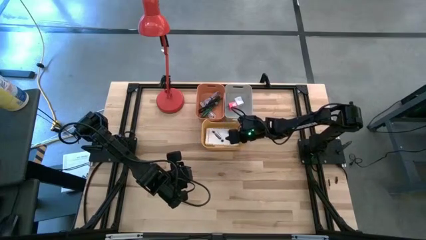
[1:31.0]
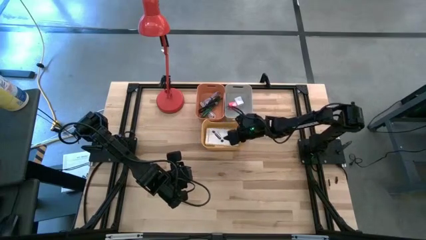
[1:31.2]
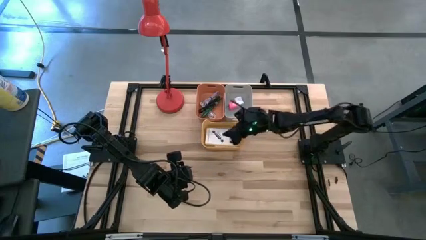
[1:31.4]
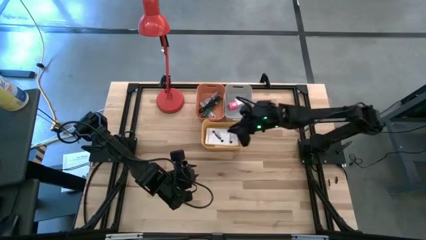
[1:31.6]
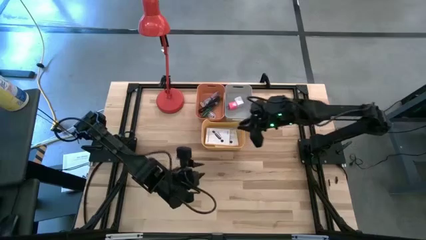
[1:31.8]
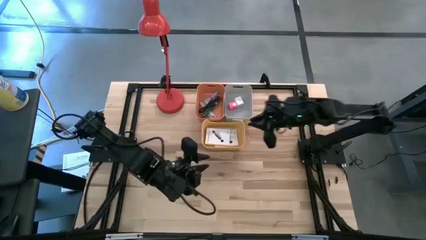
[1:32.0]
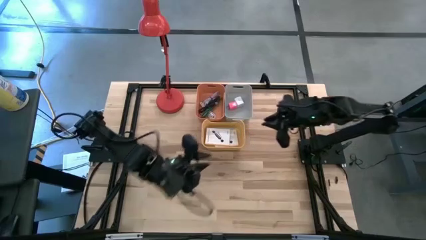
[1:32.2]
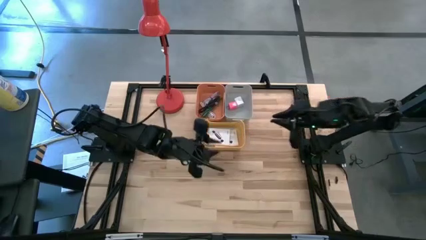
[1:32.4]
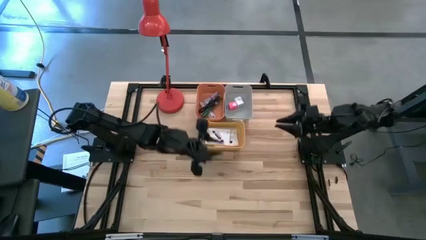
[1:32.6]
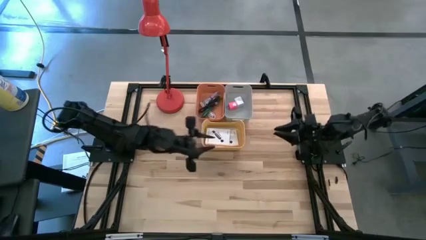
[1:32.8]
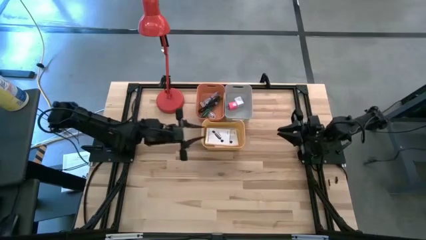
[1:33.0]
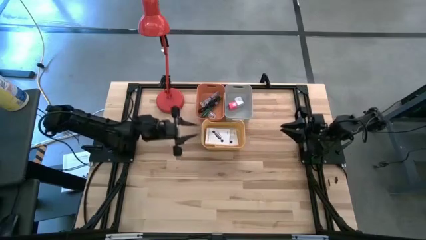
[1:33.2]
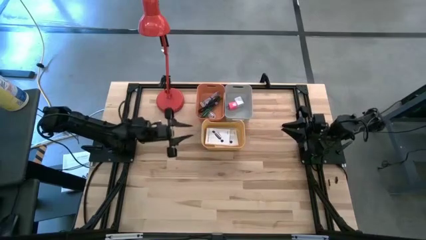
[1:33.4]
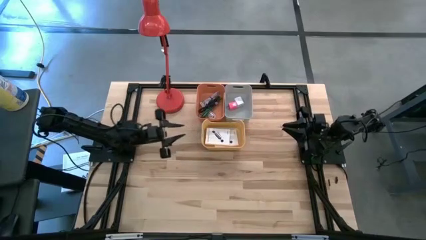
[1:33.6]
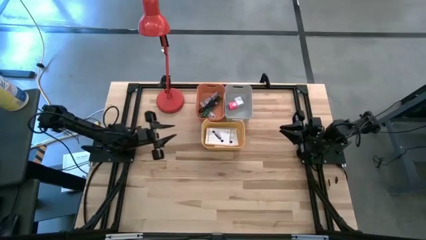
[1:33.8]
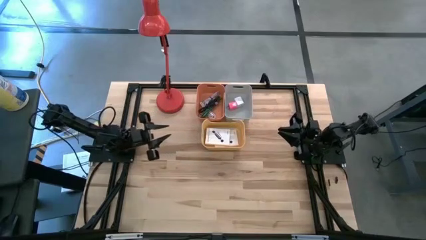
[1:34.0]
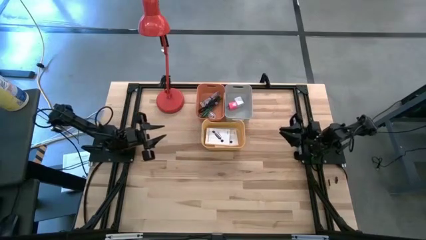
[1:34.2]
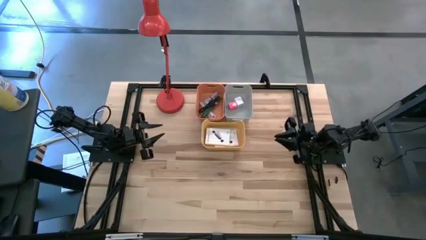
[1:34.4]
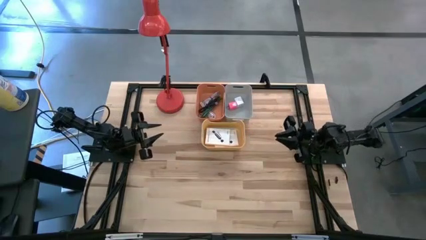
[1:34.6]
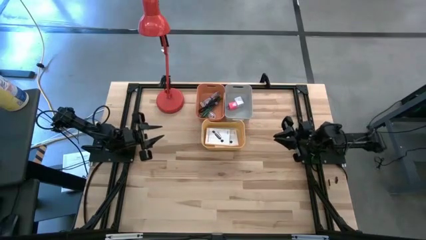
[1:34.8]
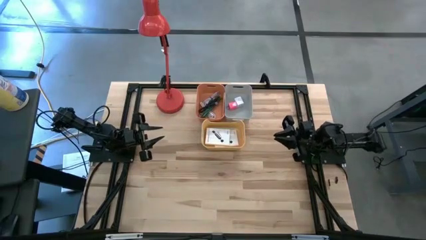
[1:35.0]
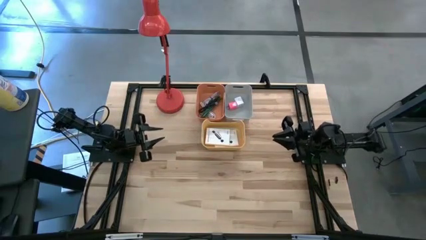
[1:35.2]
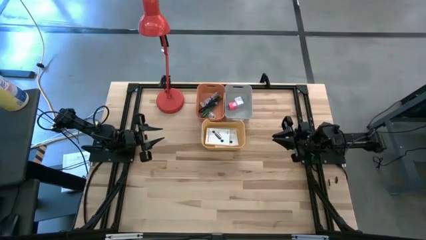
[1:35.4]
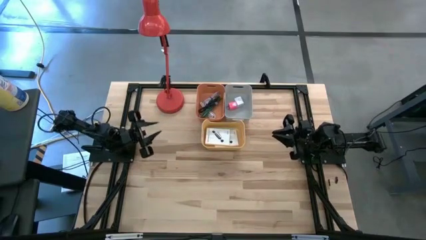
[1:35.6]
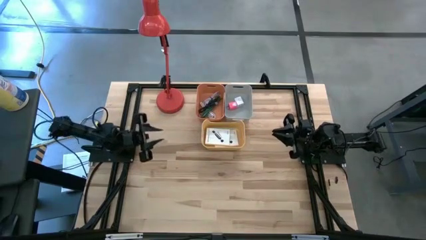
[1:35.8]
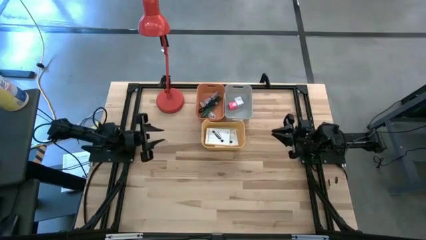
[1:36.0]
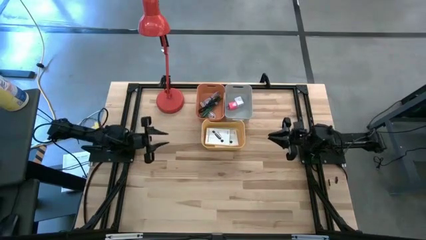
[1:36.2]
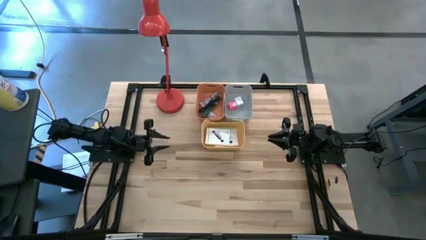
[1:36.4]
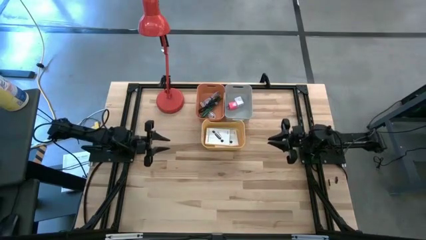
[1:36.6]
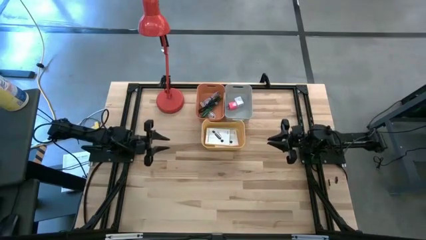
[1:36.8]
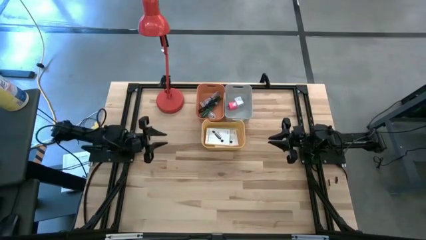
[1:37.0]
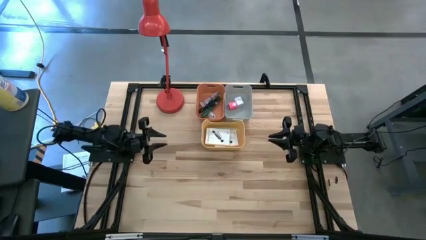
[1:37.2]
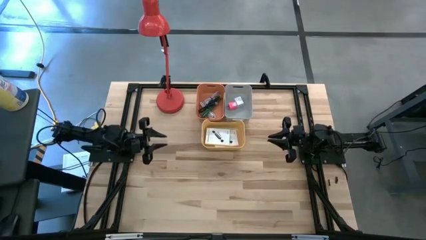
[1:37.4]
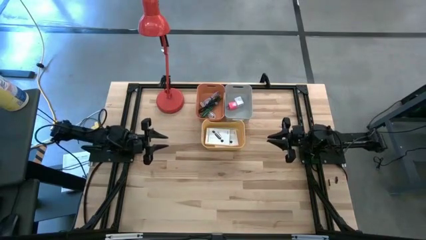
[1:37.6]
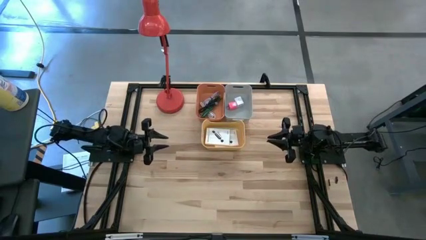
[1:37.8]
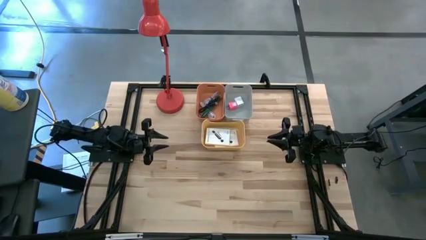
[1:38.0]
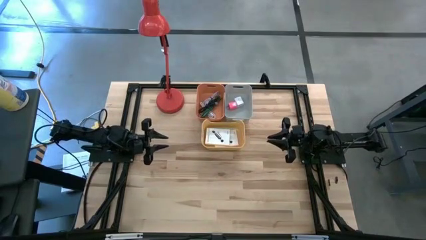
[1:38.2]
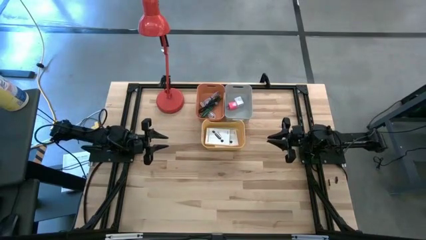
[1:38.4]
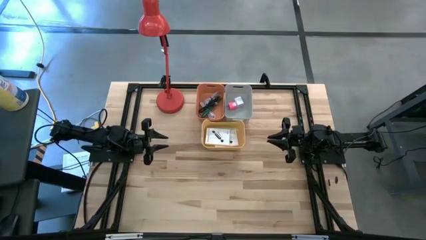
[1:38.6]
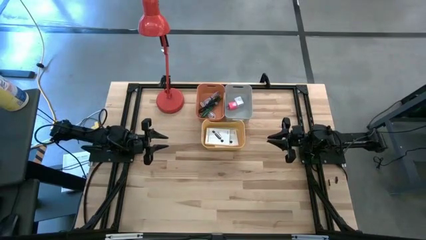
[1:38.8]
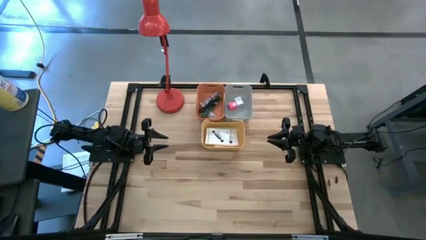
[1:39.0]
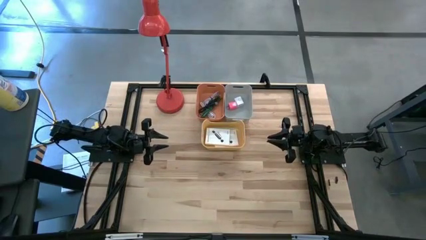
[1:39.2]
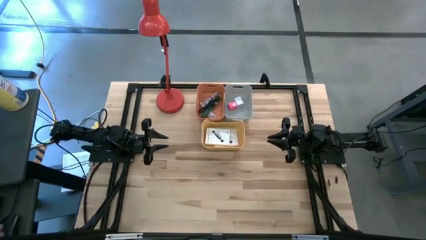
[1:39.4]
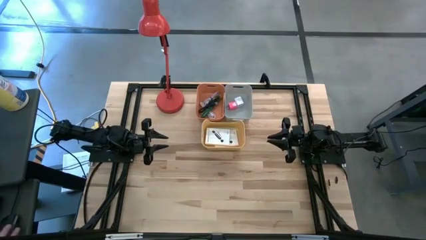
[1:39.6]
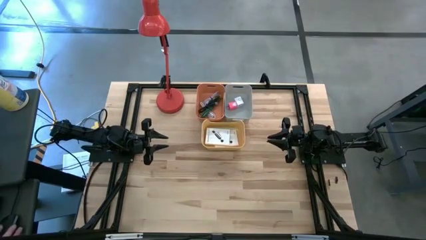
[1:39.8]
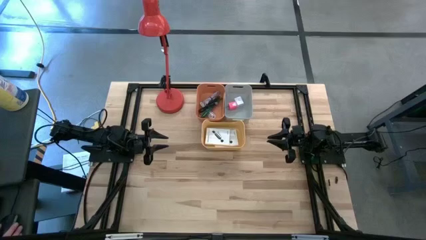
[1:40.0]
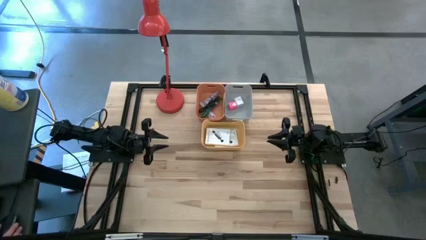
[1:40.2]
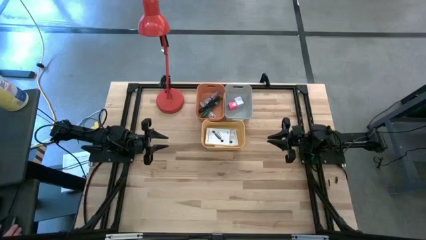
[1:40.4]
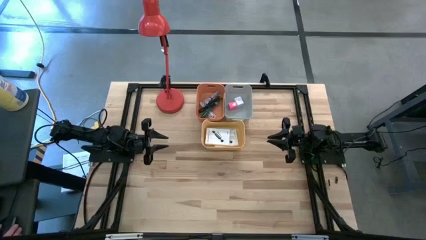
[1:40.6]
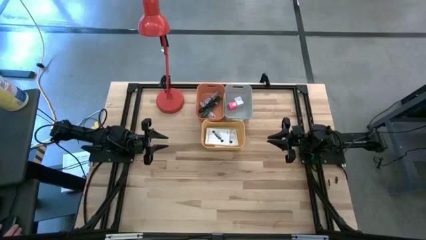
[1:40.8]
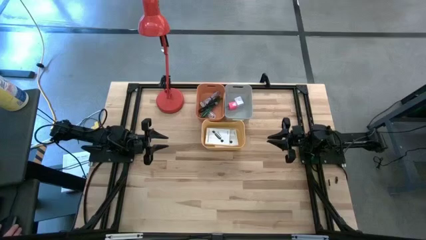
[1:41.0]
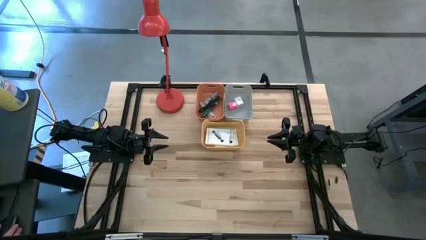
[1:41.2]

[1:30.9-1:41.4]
Task: Pick and place items into bin
Return to Home Position

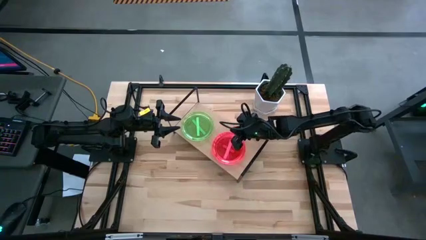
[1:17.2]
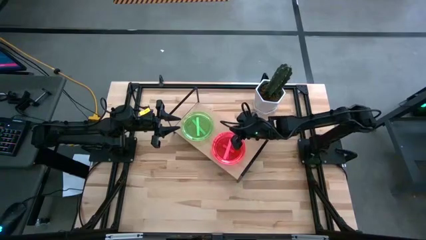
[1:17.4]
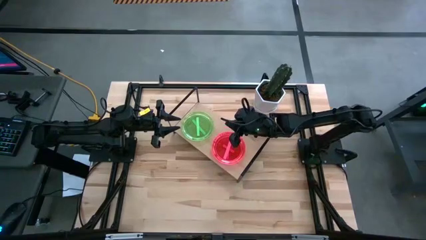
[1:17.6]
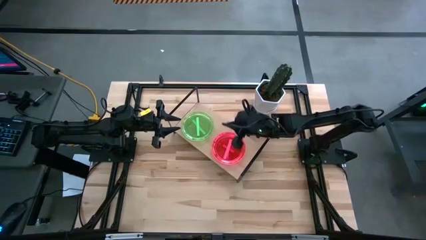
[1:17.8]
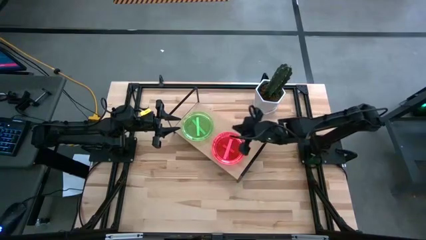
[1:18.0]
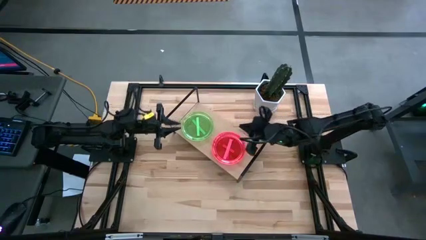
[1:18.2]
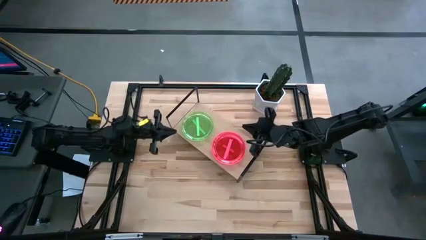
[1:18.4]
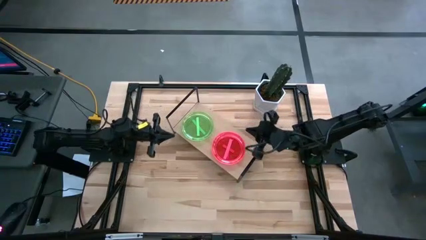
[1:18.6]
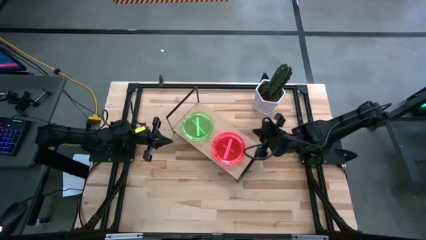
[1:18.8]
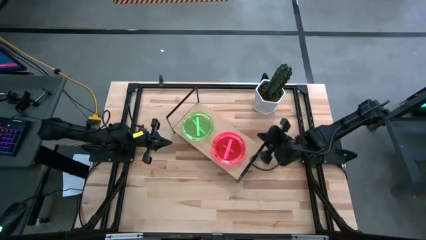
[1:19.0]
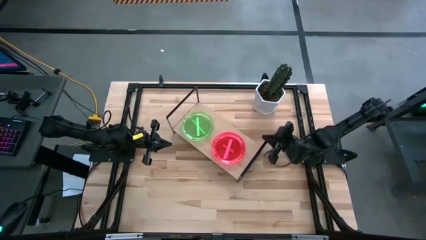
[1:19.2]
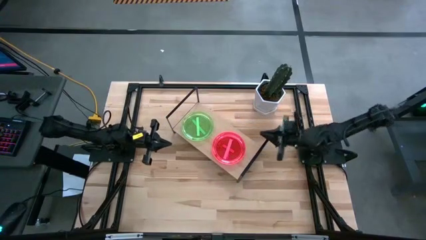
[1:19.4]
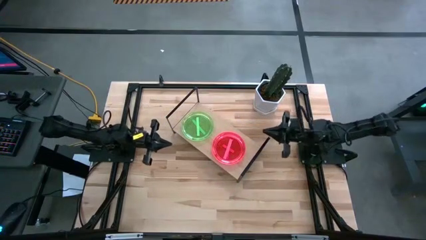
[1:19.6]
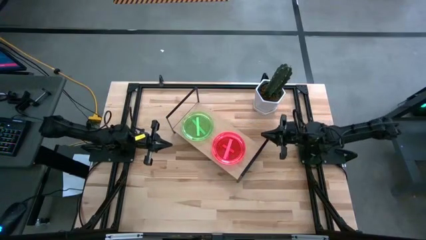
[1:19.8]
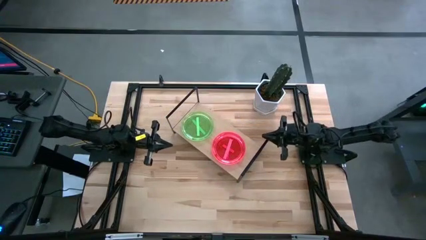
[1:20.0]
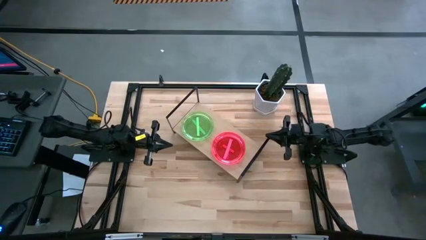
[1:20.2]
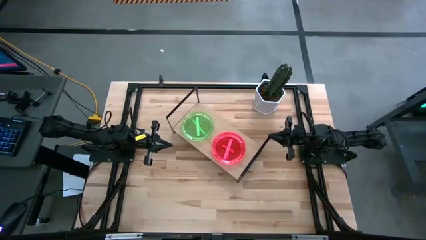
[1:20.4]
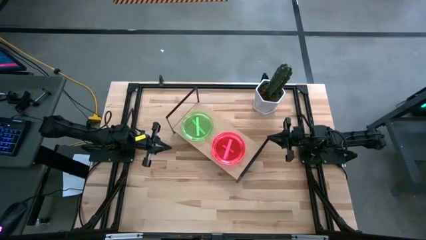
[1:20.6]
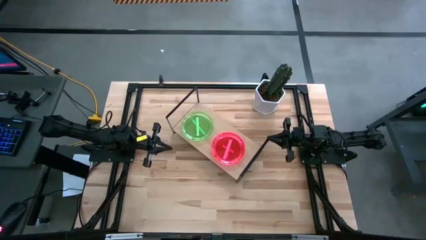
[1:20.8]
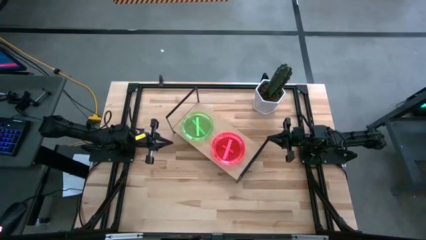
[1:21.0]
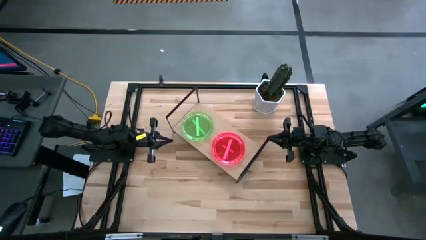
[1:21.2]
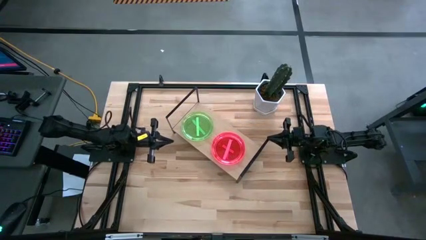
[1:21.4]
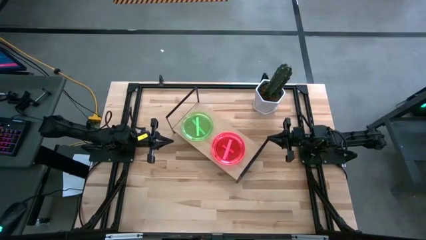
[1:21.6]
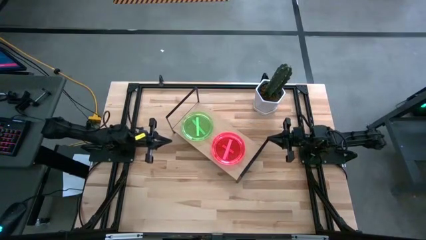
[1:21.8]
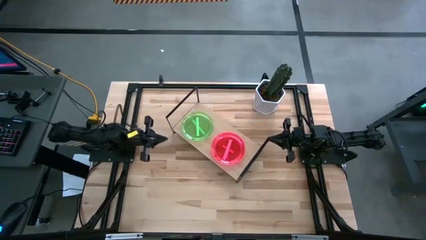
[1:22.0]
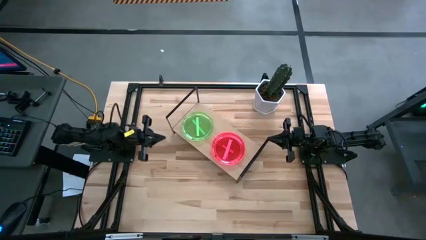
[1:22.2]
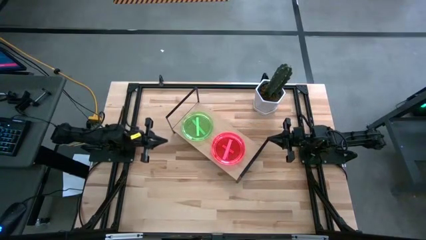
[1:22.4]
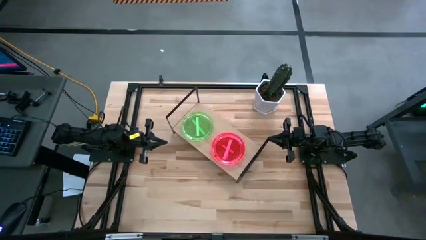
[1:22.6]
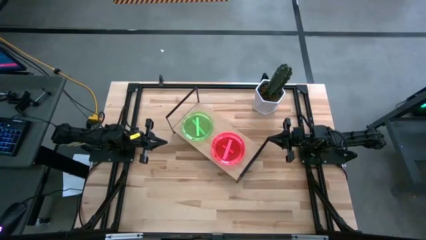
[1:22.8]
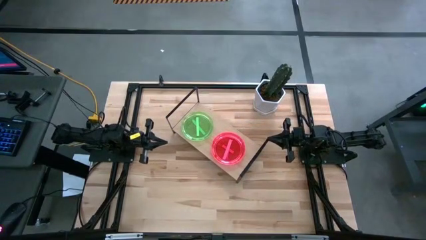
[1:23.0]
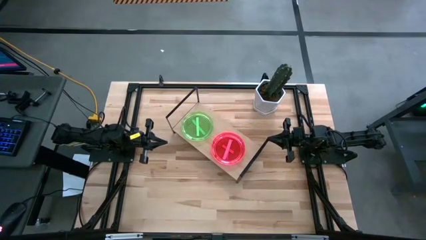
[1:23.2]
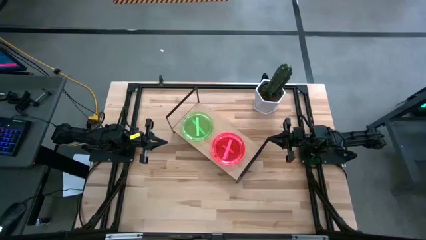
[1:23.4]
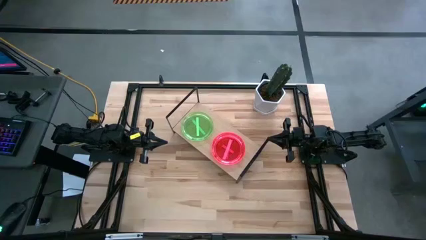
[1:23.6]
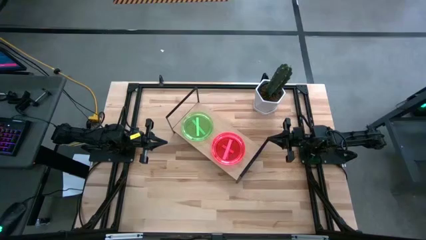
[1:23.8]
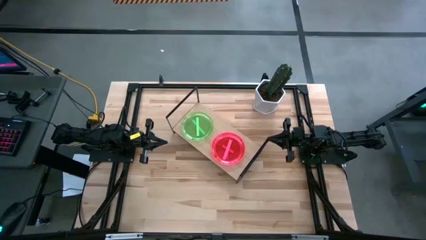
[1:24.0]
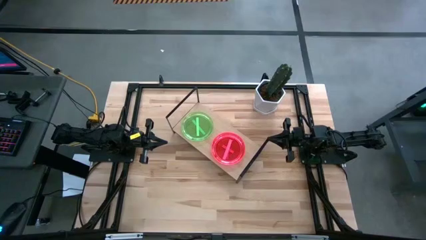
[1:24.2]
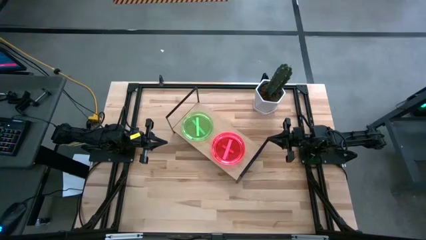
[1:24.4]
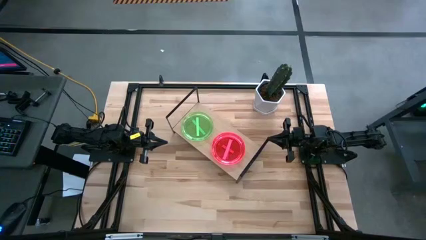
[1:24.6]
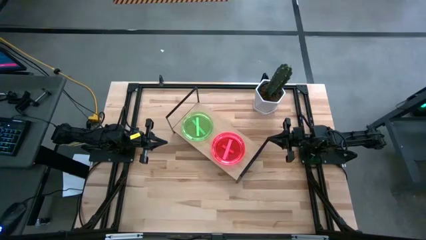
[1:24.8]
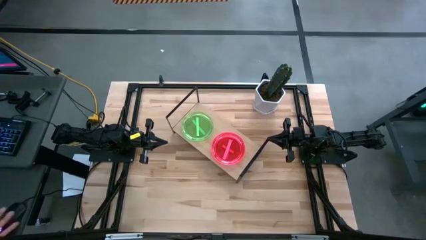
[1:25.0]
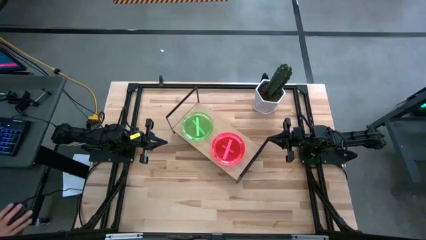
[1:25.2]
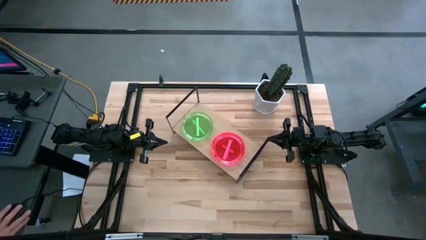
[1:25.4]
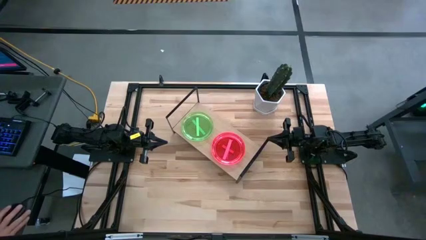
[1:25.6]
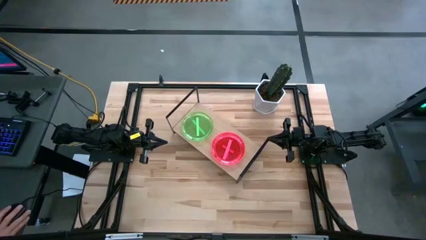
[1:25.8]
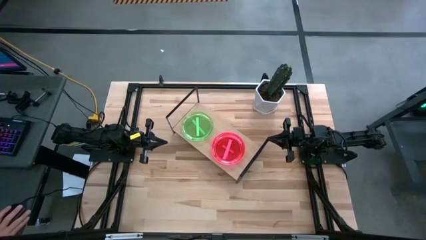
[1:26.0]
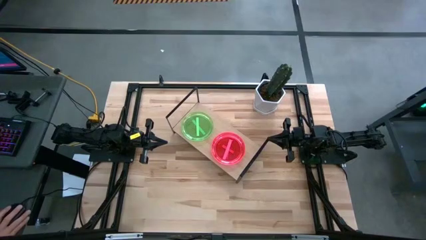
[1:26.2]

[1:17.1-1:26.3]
Task: Place and stack plates onto a shelf
Return to Home Position
